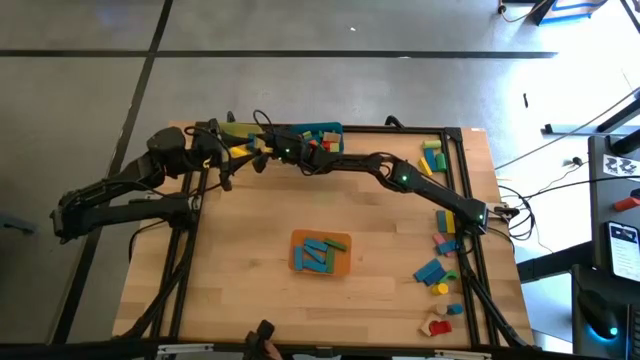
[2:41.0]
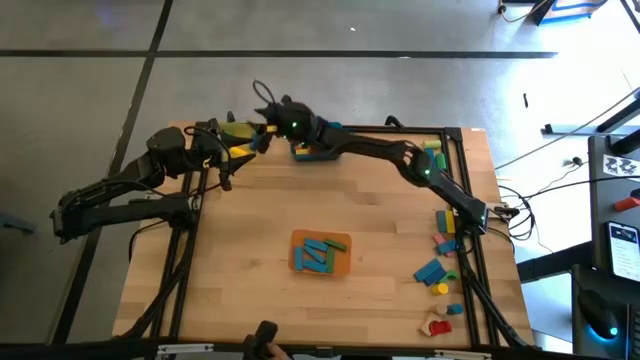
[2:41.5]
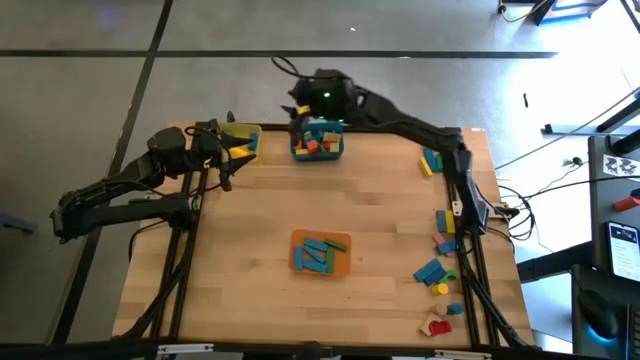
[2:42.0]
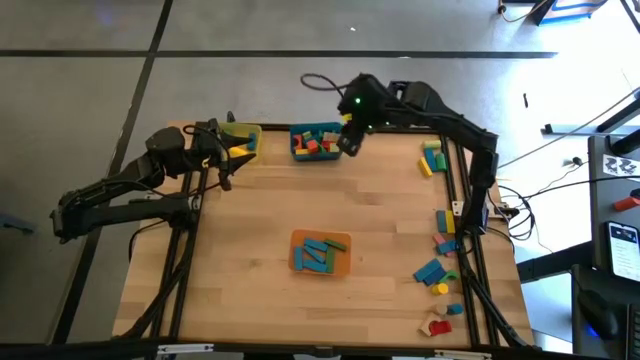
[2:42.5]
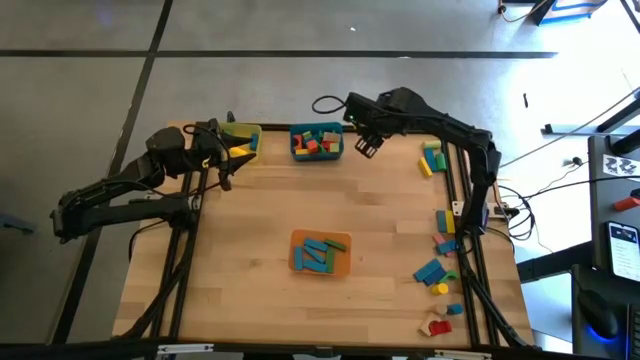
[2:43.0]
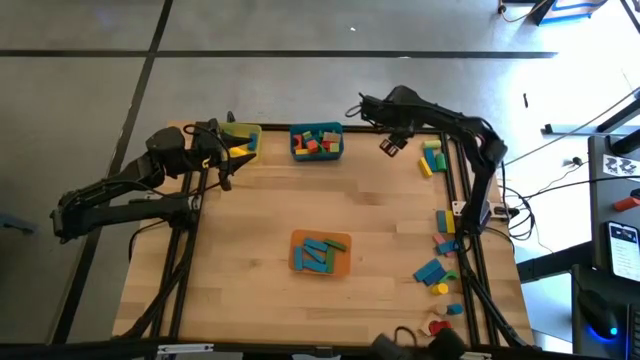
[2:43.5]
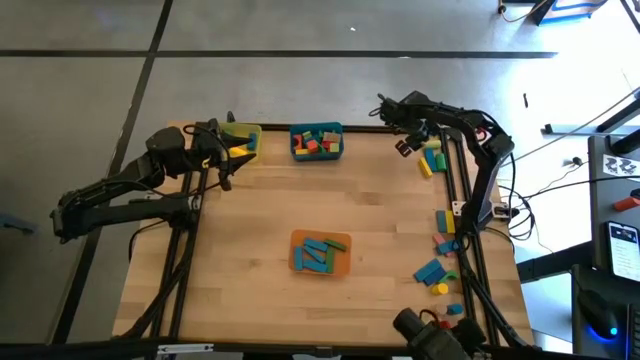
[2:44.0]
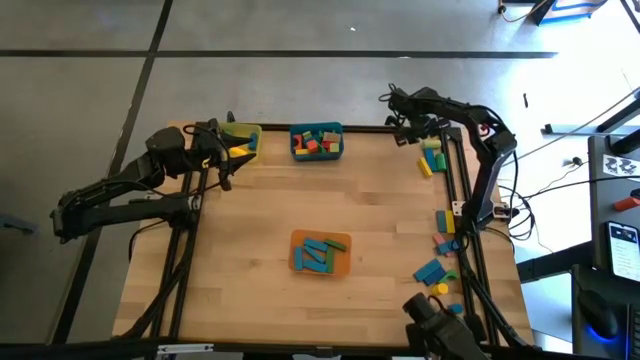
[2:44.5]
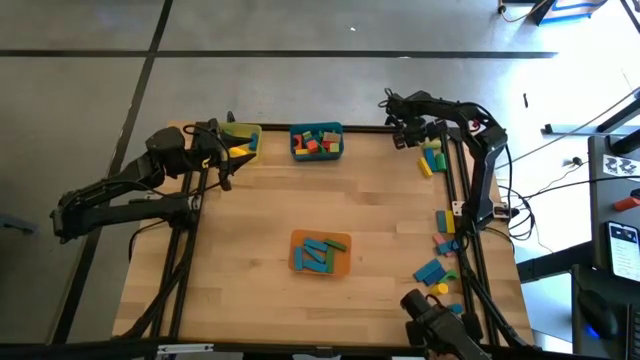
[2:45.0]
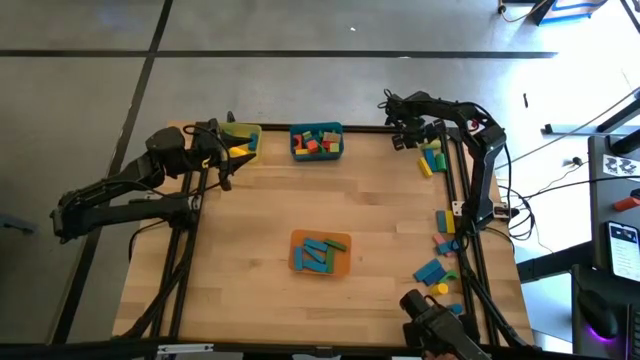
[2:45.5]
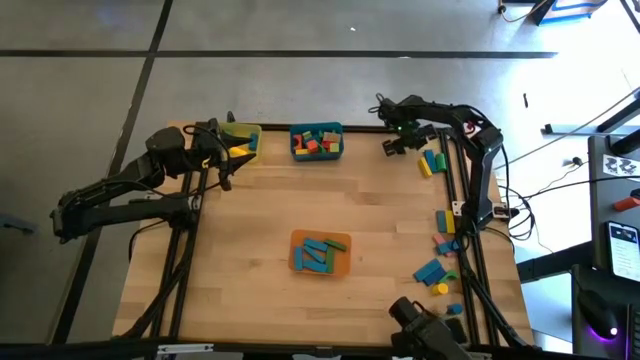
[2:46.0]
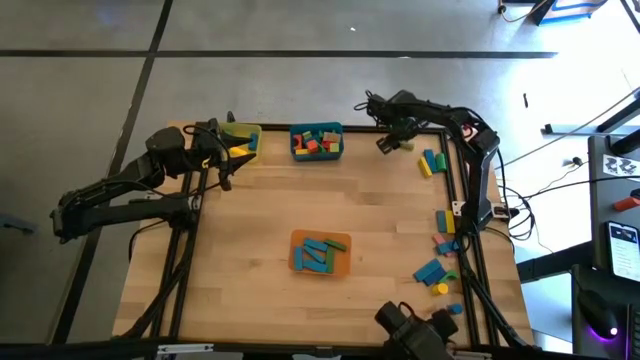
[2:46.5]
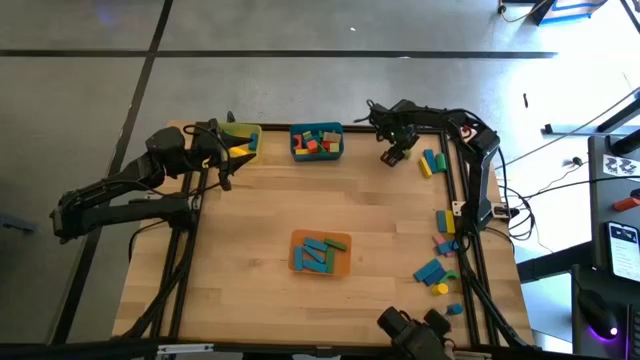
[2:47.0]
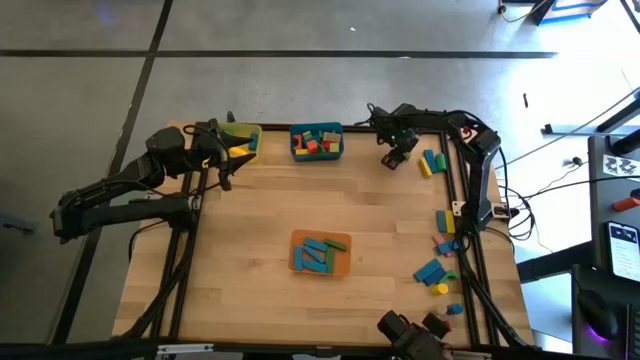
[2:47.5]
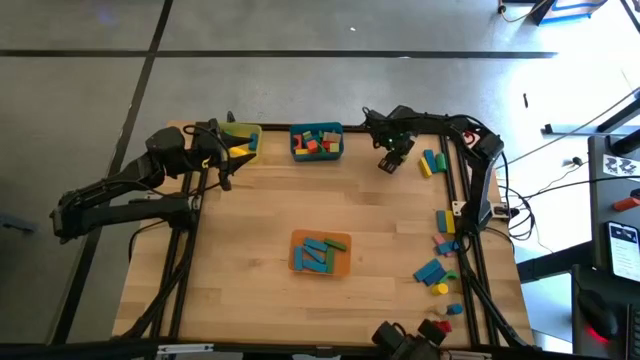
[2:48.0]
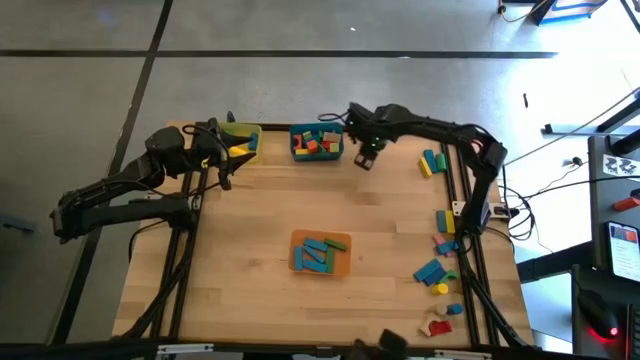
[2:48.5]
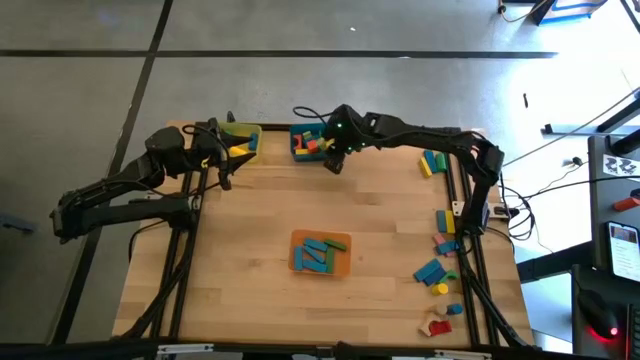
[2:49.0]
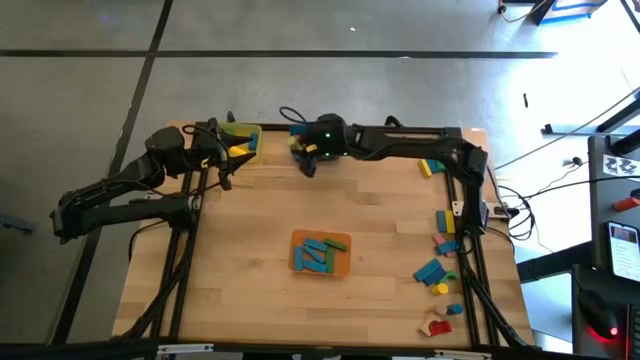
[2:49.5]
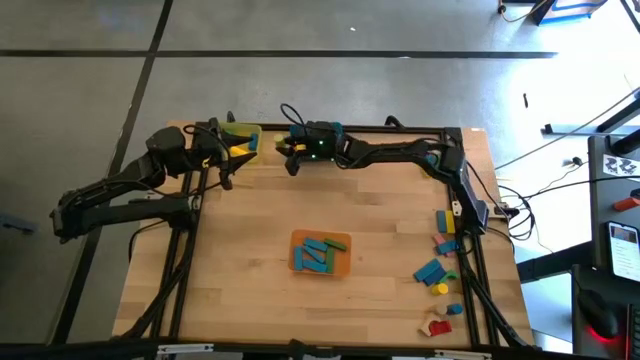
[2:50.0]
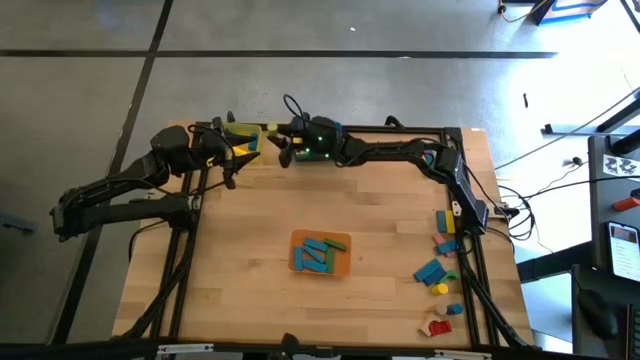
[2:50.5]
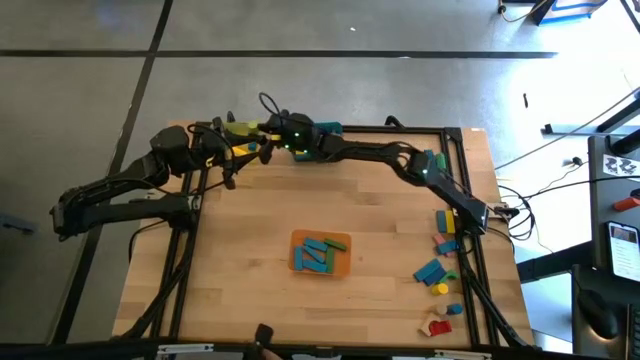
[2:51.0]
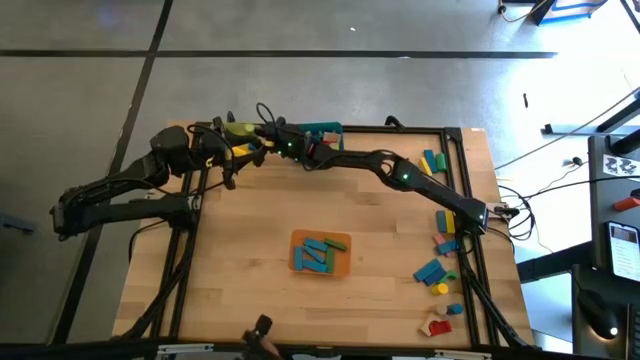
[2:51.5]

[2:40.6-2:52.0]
Task: Sort blocks by size
Put the light green cylindrical block into the yellow bin

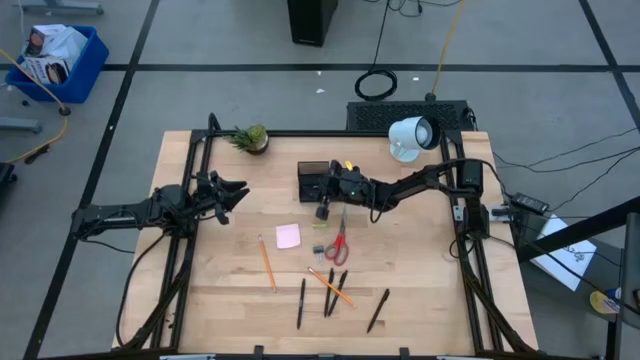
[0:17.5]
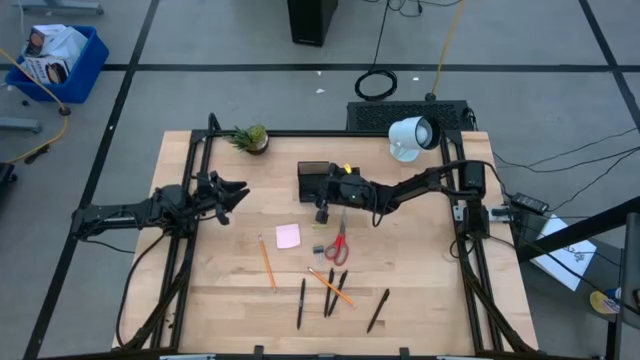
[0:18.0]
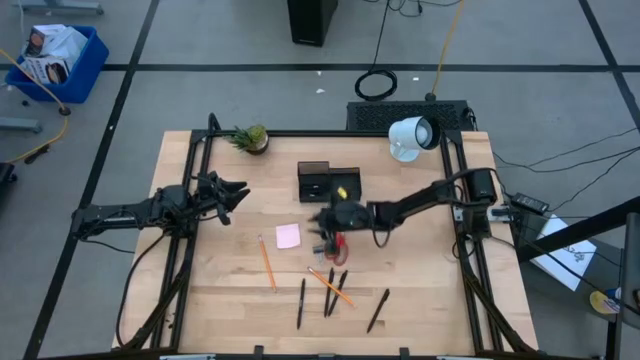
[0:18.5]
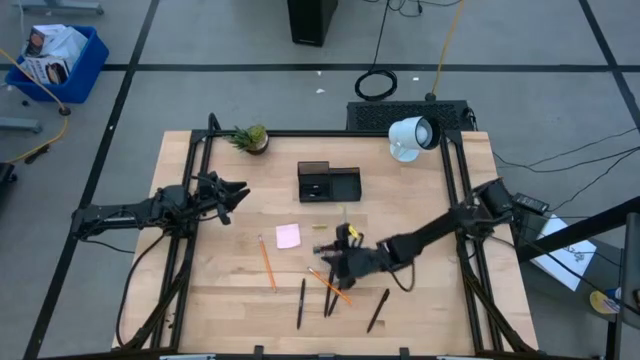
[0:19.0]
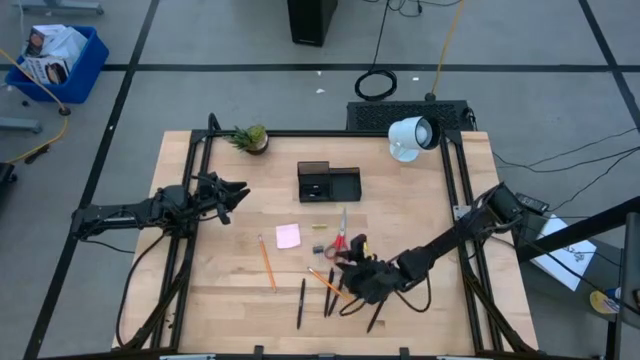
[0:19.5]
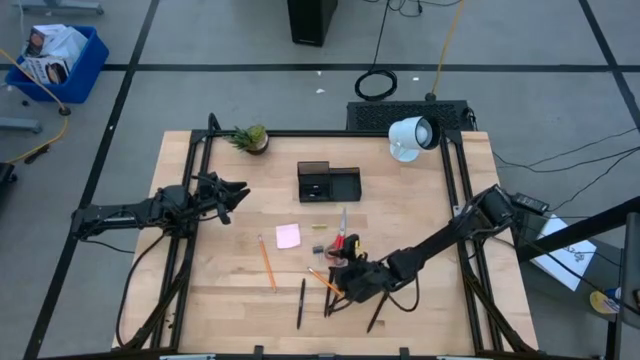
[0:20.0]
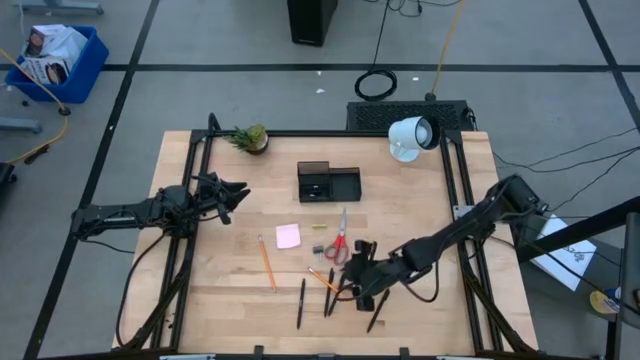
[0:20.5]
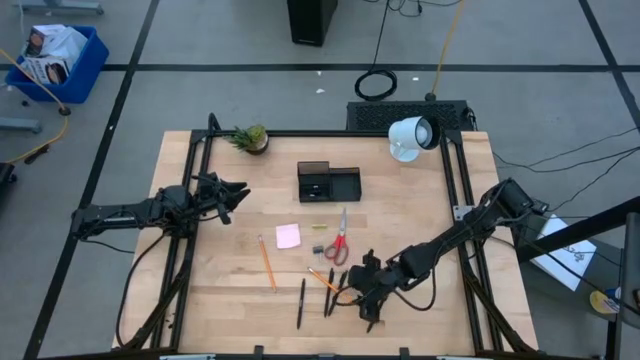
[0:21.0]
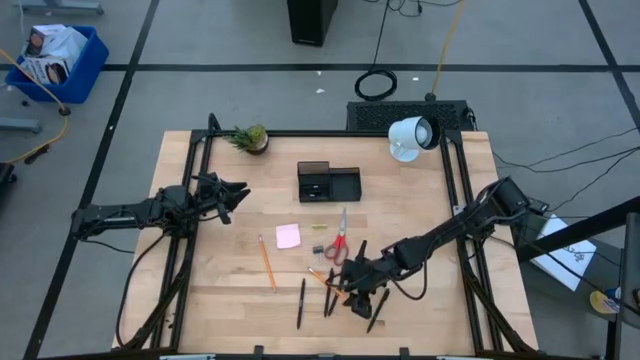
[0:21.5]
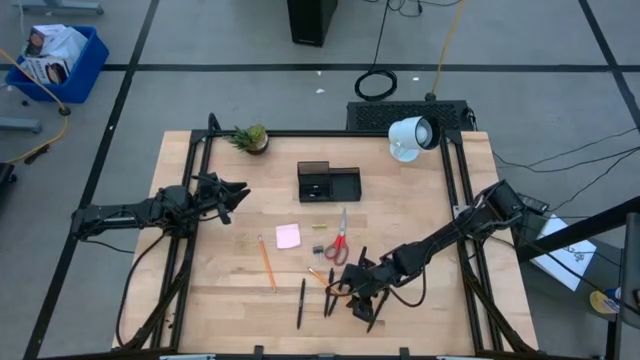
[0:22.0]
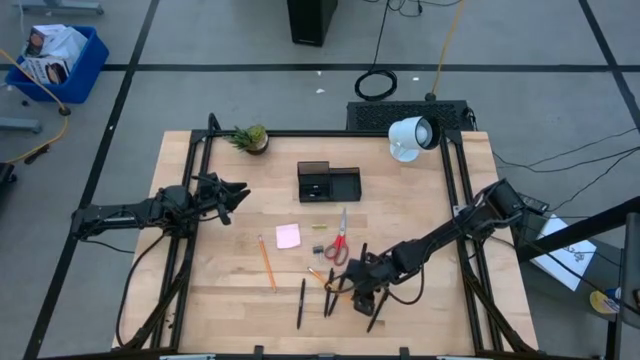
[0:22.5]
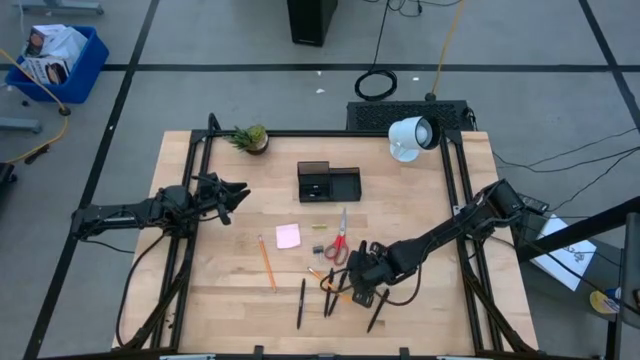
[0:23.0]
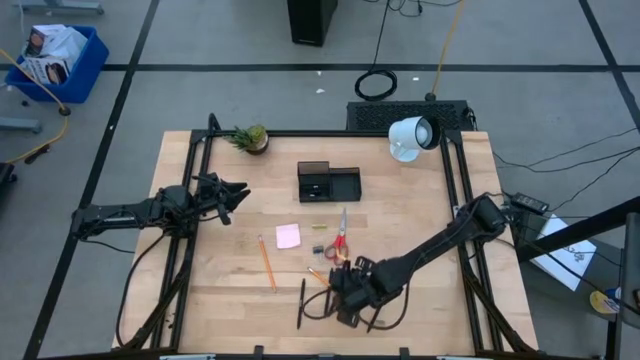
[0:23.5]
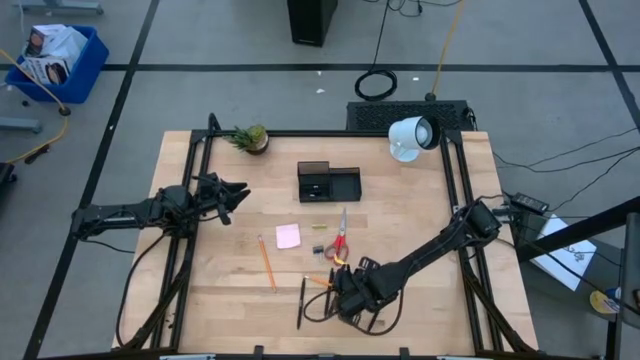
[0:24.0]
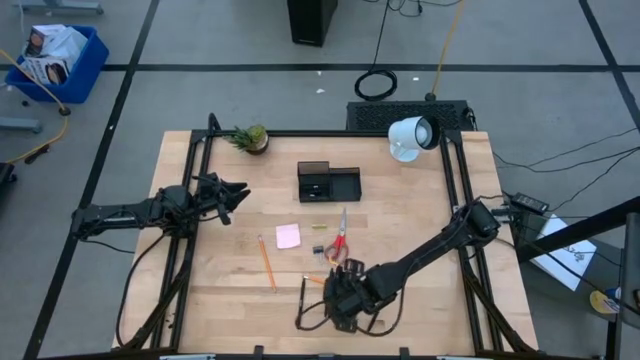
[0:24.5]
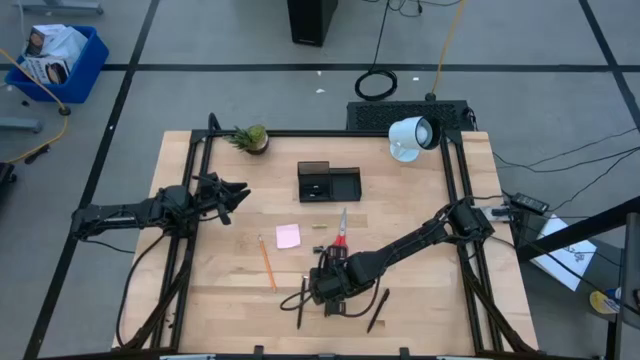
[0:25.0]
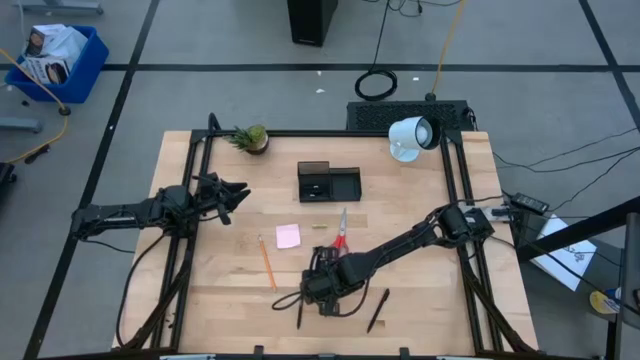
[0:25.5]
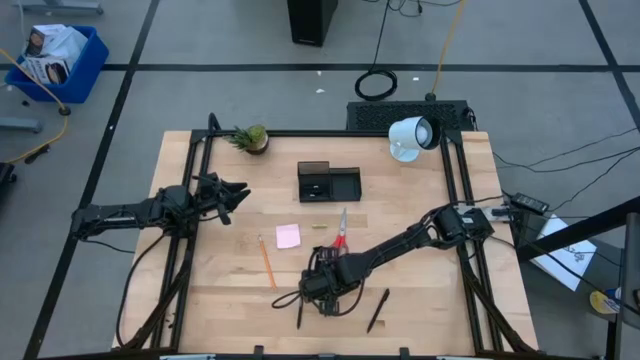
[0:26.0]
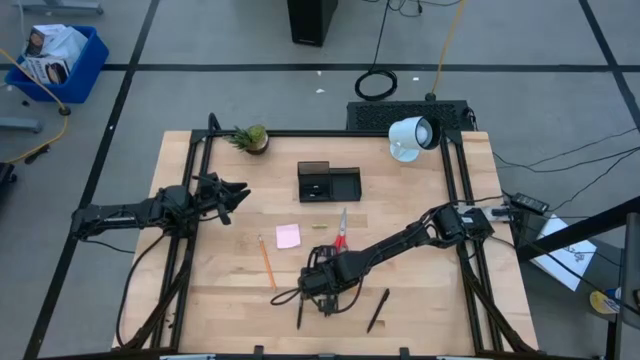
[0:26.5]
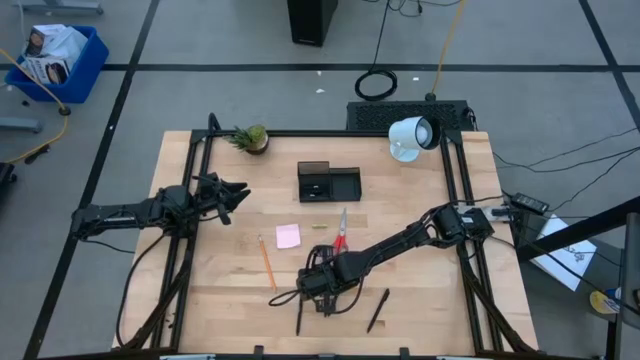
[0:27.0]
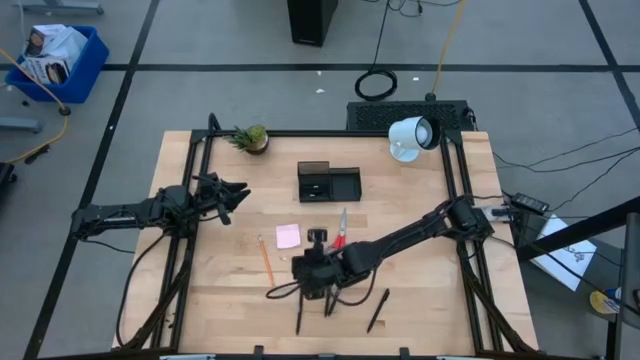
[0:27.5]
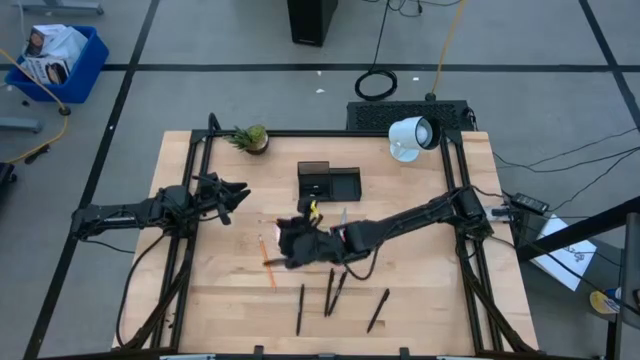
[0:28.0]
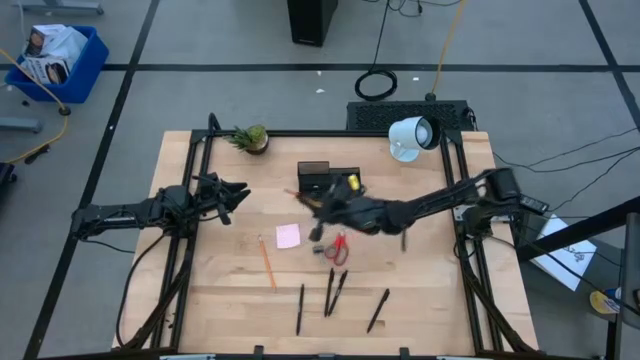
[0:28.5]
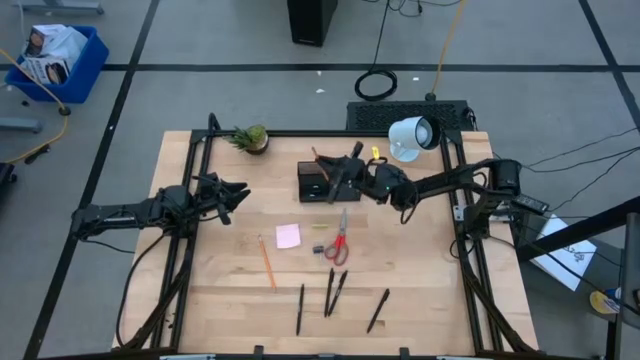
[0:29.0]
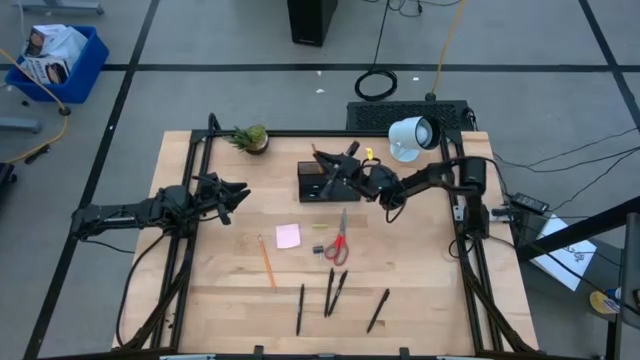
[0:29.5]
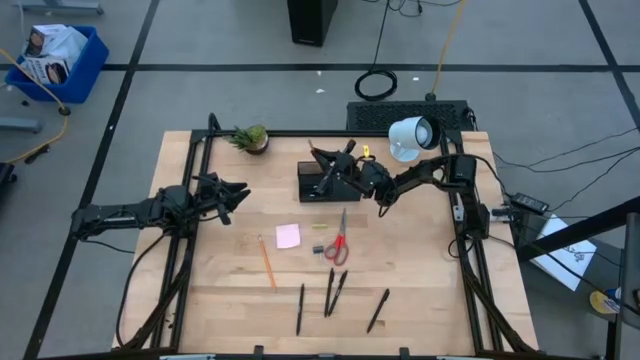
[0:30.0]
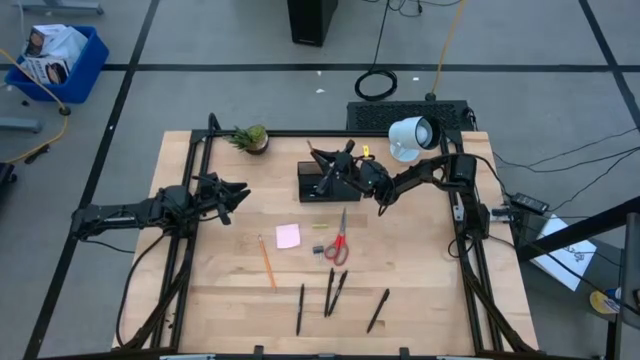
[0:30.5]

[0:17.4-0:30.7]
Task: Pick and place office supplies into organizer
Put the top pencil into the mesh organizer
